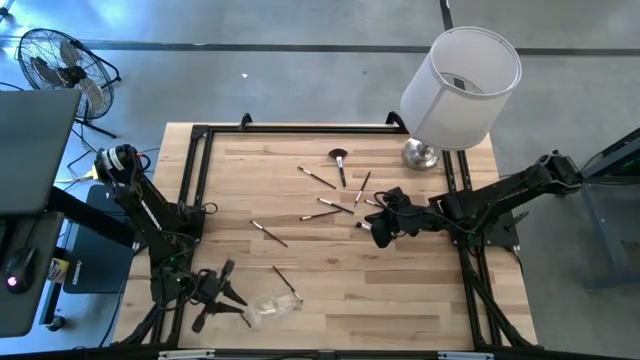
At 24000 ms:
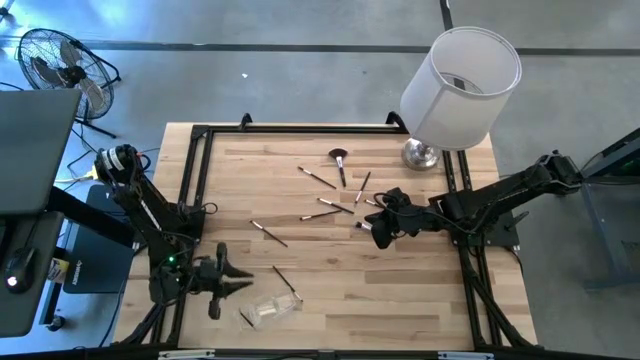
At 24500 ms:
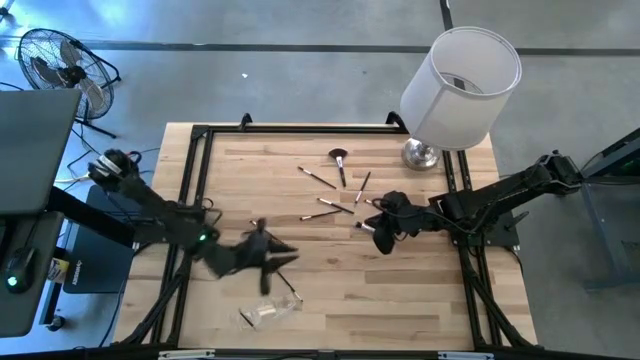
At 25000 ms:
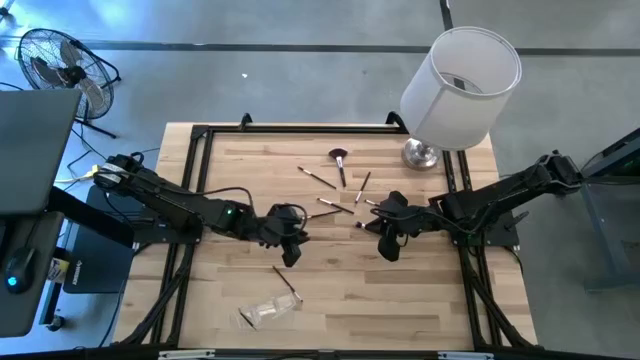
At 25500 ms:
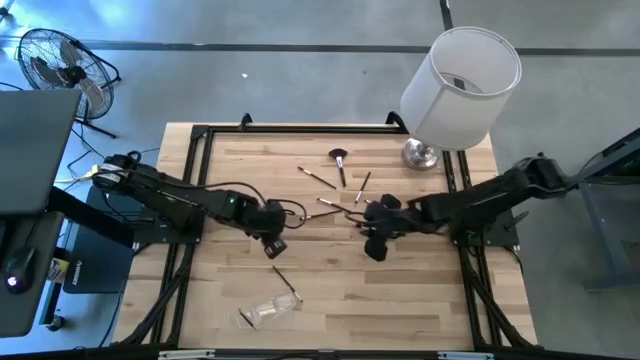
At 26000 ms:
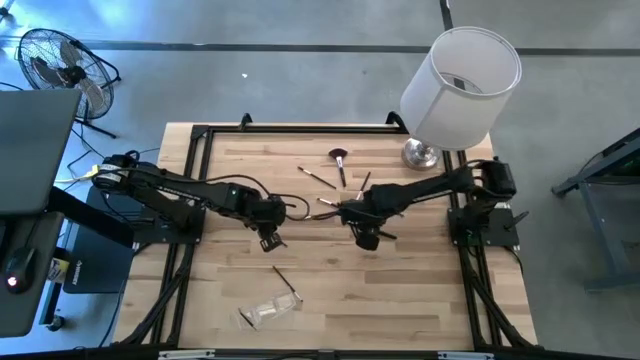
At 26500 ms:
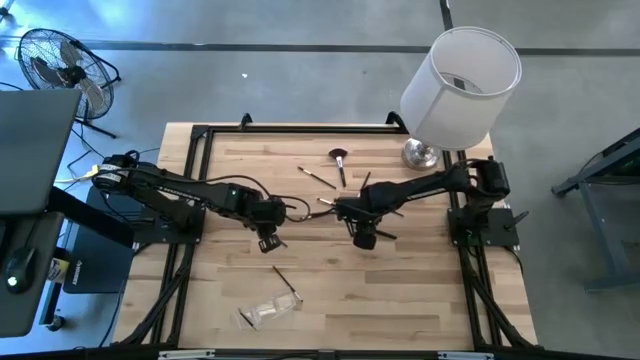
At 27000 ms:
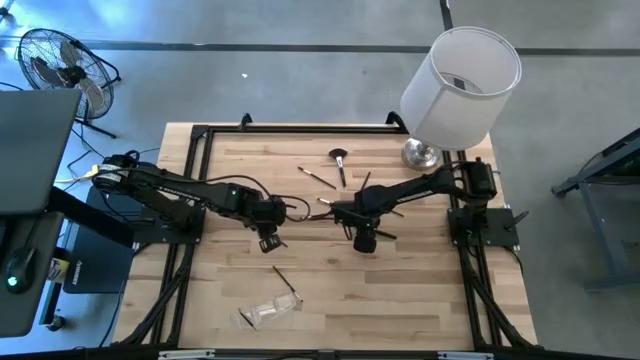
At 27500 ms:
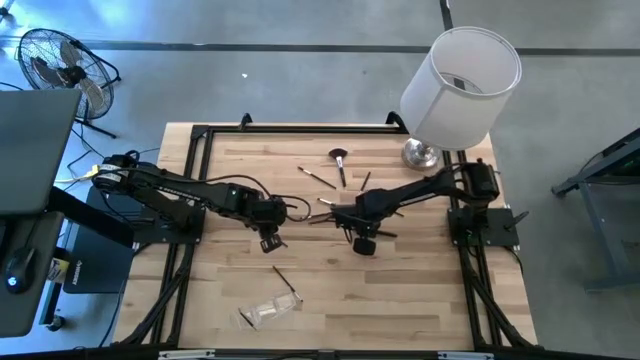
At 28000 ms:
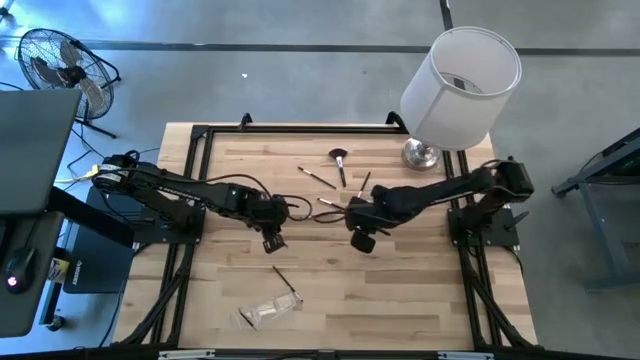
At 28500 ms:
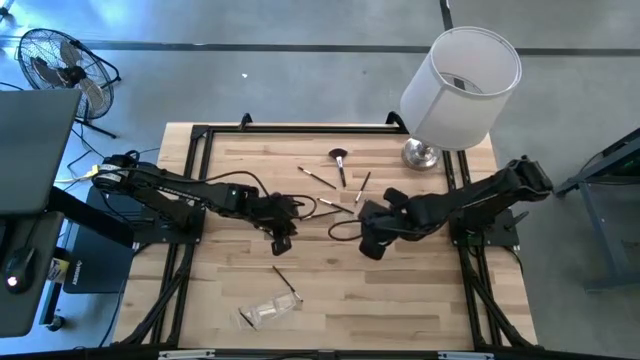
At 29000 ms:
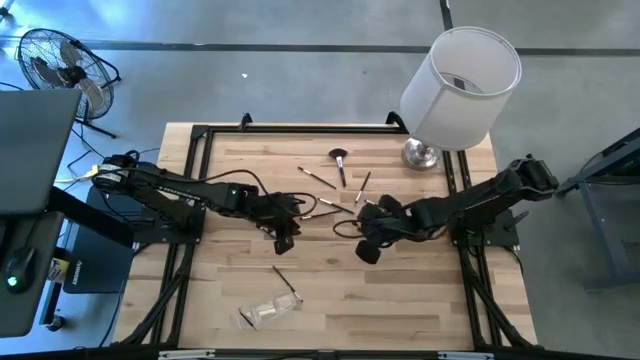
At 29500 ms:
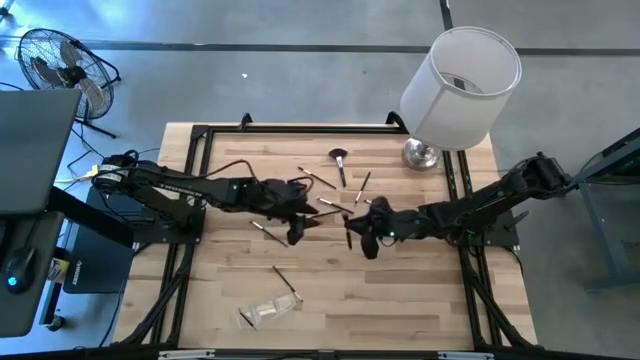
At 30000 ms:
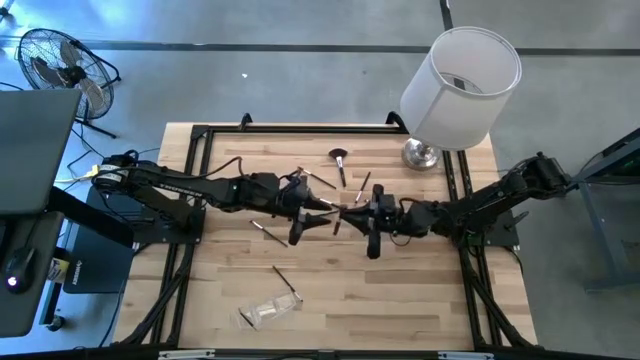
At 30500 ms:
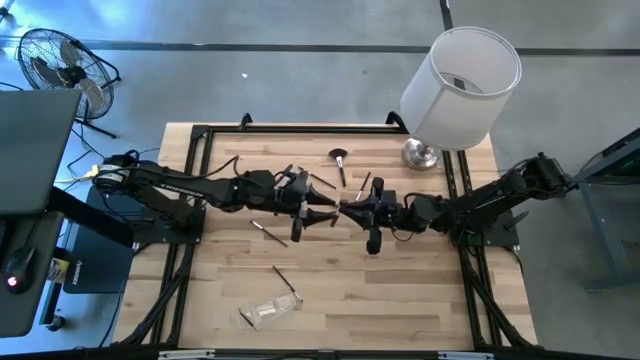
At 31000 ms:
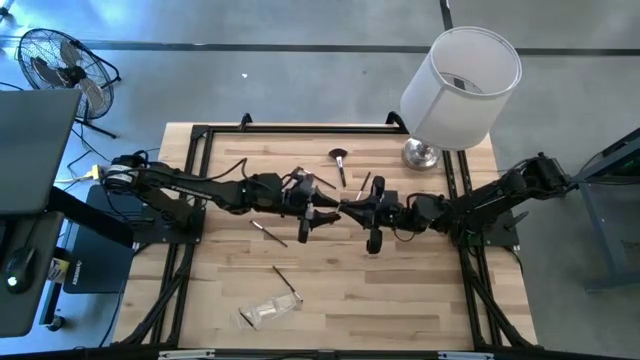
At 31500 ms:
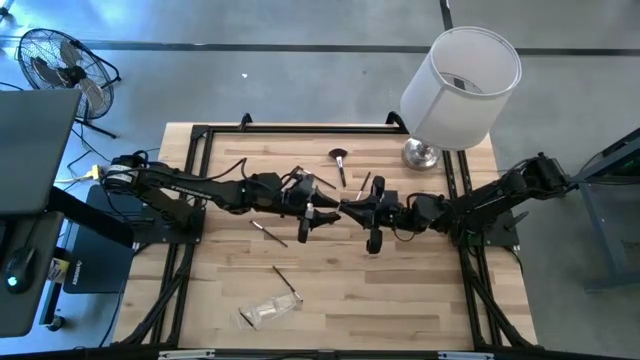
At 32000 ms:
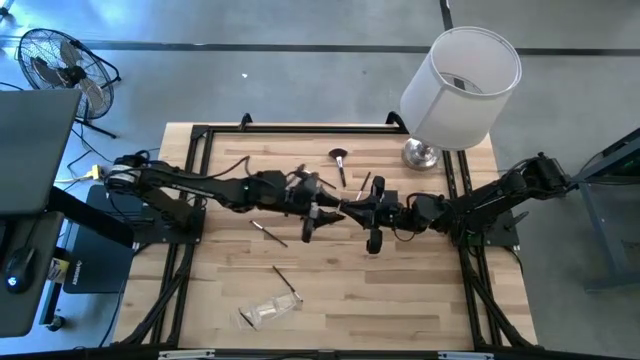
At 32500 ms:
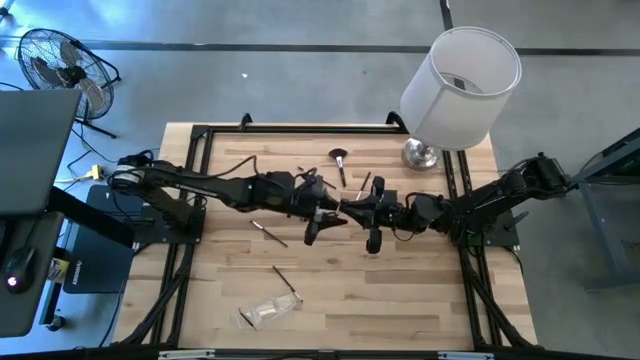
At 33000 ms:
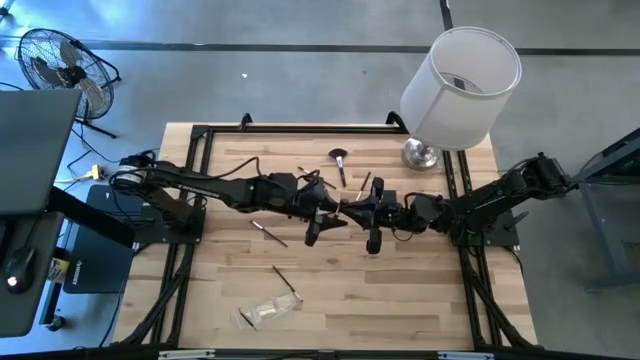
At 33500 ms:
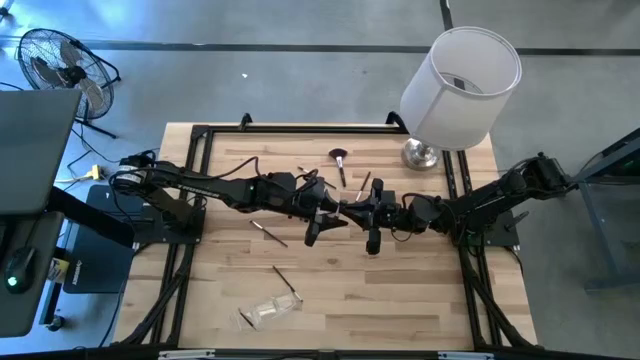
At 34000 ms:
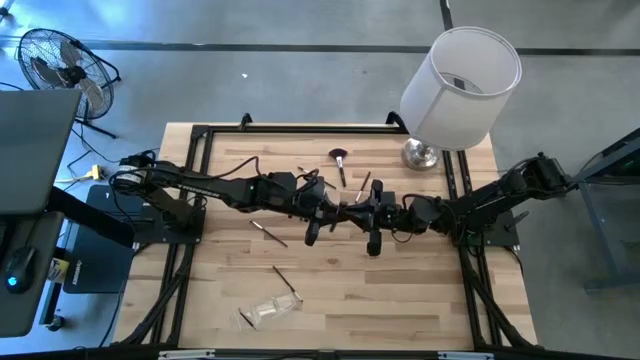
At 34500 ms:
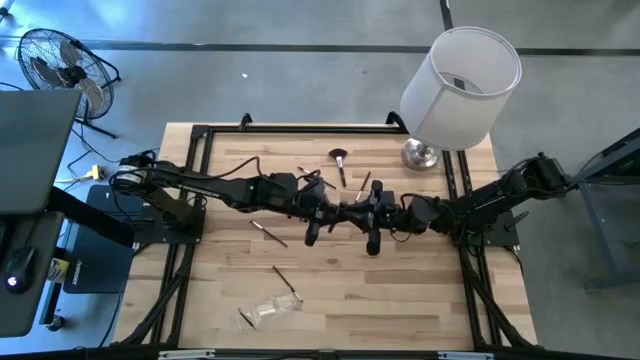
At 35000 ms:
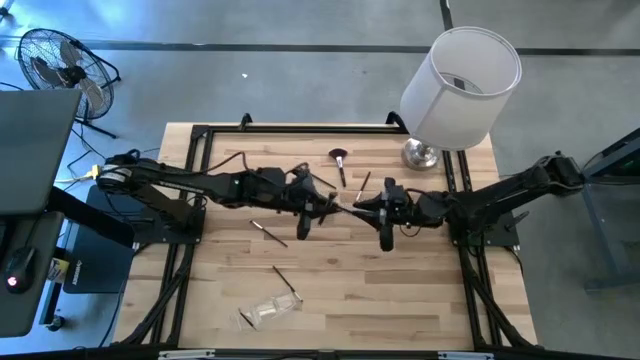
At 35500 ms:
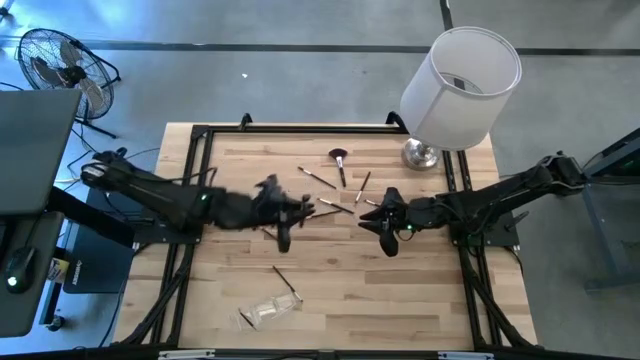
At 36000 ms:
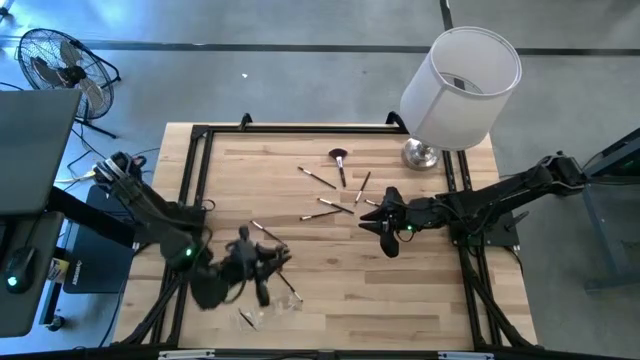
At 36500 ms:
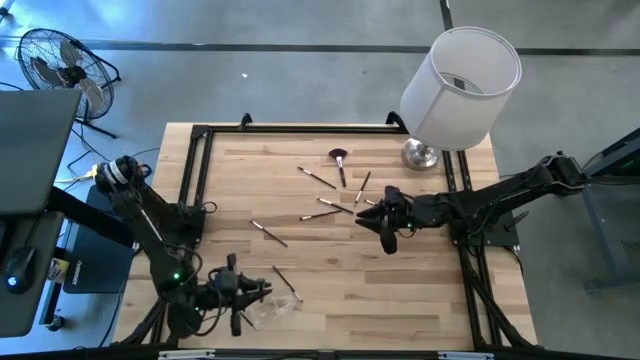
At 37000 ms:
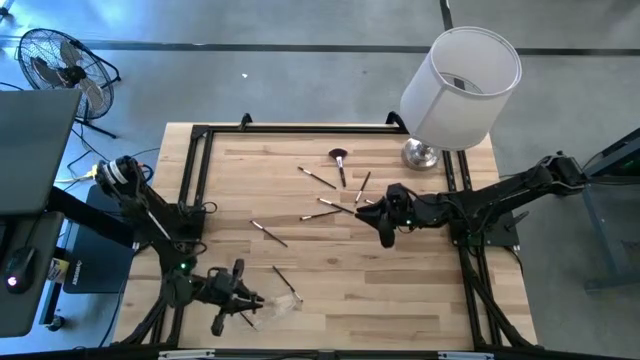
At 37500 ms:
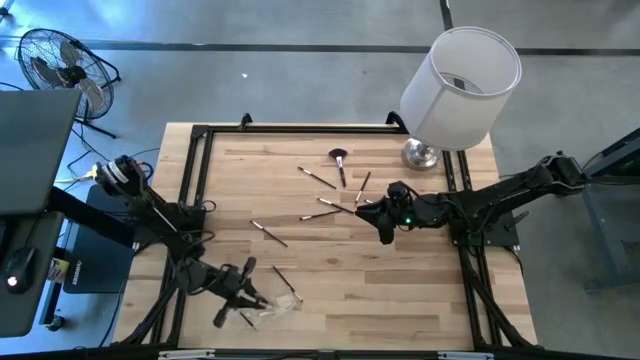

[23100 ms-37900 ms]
Task: Pick & Place Makeup Supplies
Put the silver makeup brush into the transparent organizer

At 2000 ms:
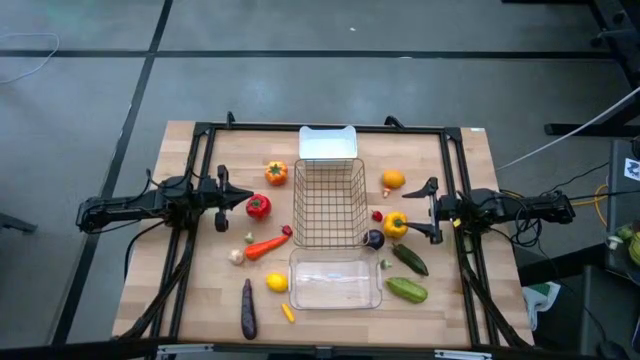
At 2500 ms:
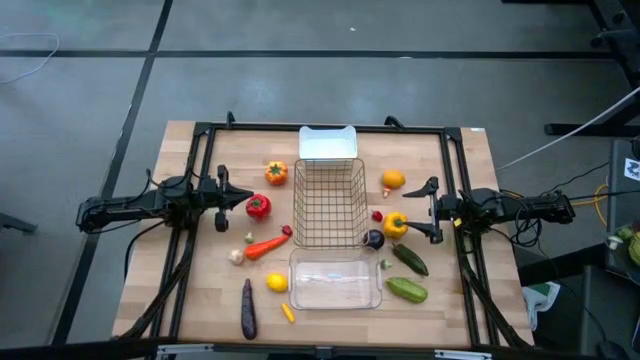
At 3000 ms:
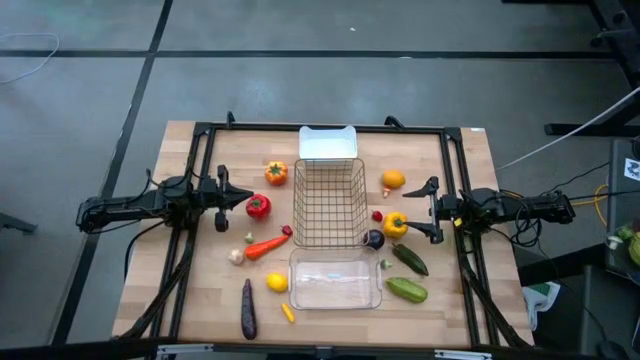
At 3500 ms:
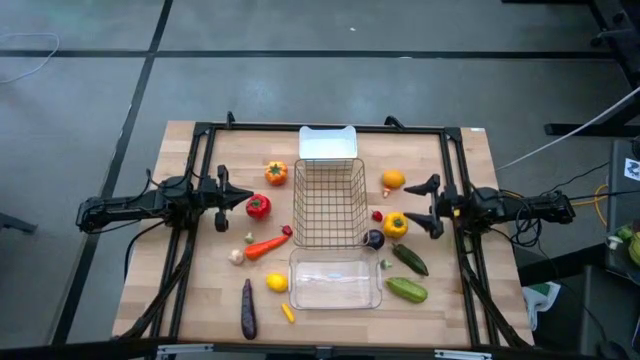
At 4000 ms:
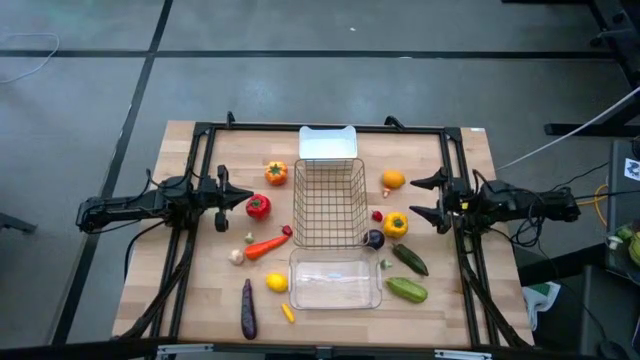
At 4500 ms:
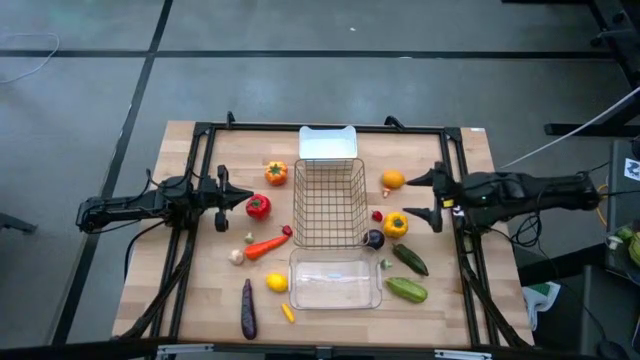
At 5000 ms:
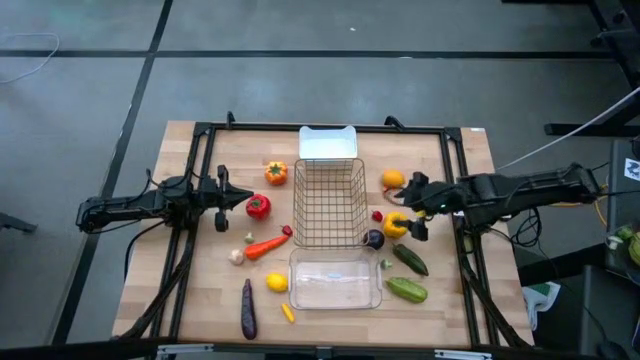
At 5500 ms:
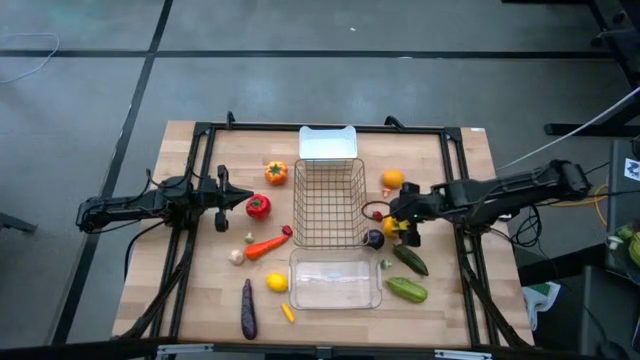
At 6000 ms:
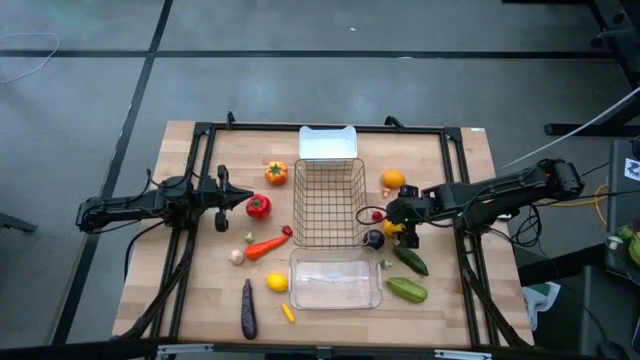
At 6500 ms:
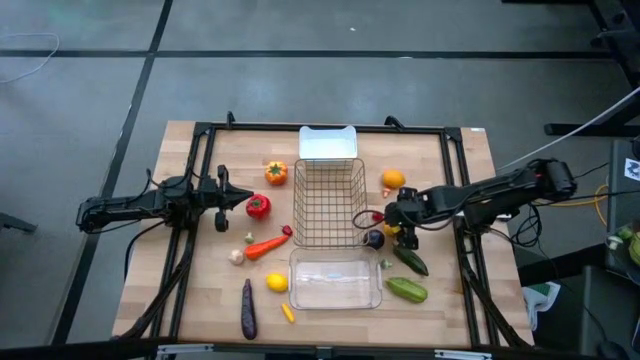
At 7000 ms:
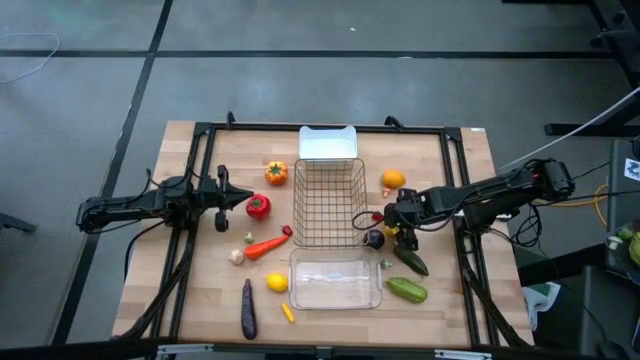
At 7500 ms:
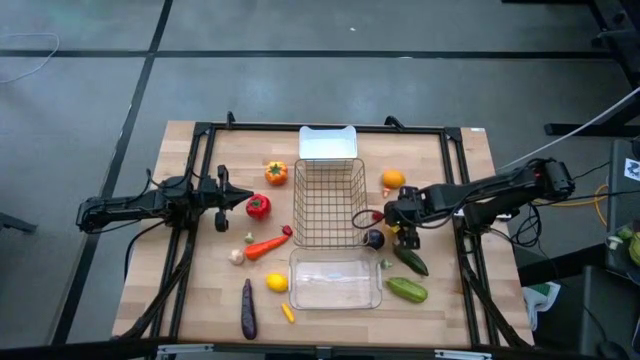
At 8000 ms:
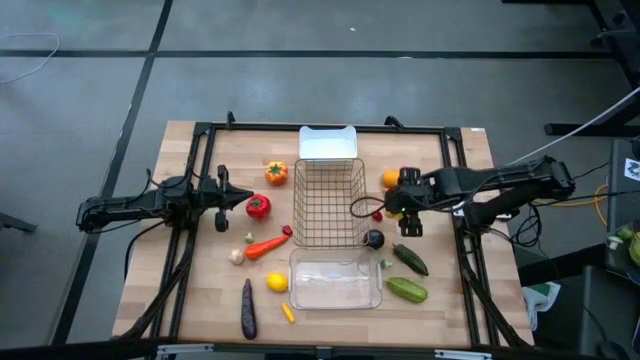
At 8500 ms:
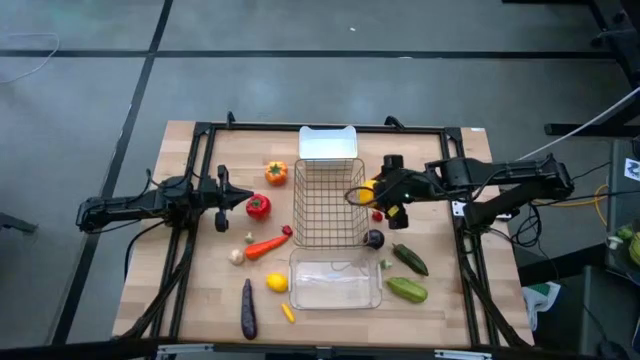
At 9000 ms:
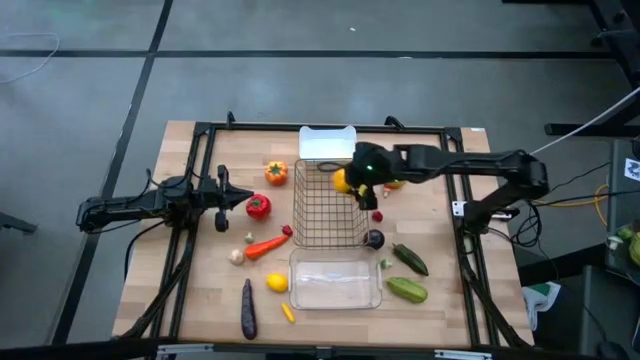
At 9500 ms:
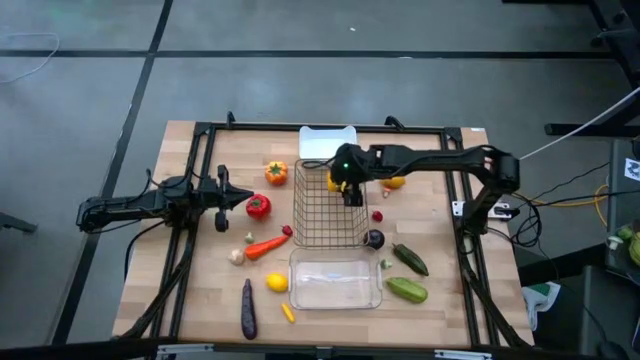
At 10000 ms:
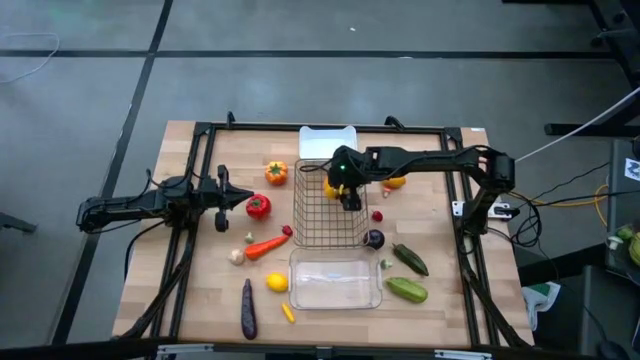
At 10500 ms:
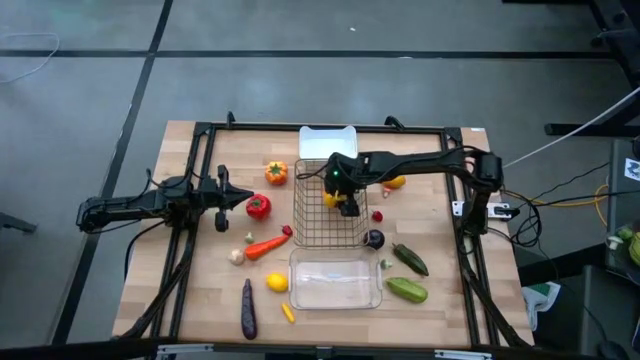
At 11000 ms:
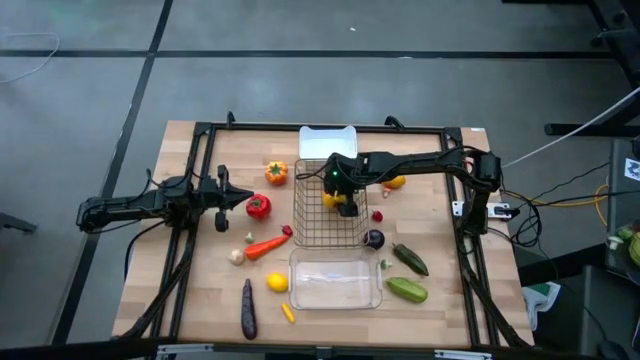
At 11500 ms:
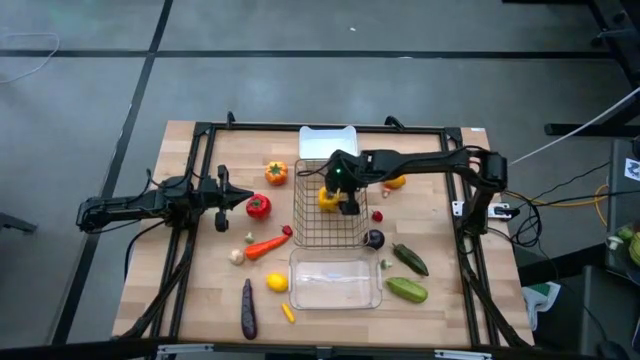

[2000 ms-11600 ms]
Task: Sort produce into baskets
Put the yellow bell pepper into the wire basket
